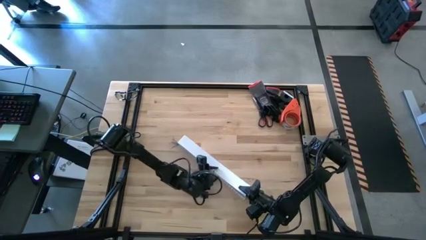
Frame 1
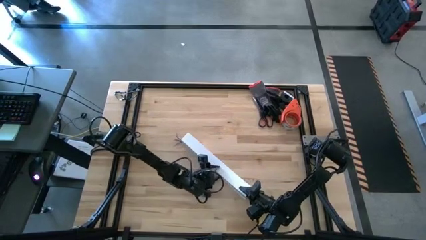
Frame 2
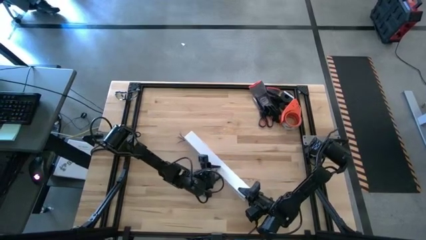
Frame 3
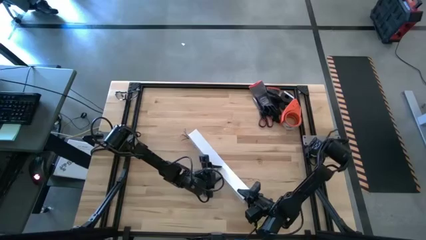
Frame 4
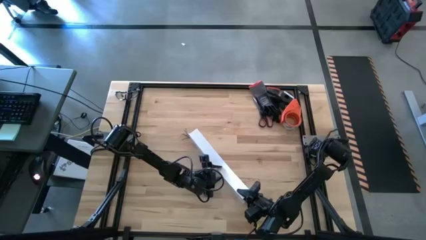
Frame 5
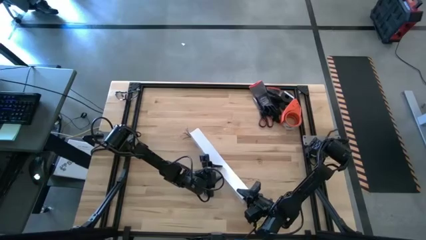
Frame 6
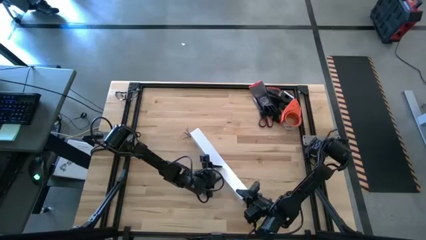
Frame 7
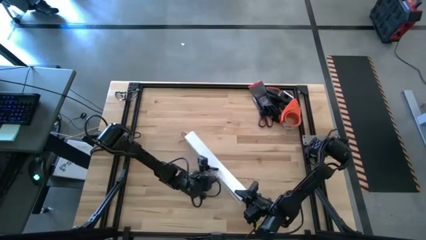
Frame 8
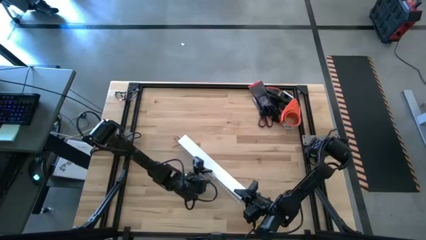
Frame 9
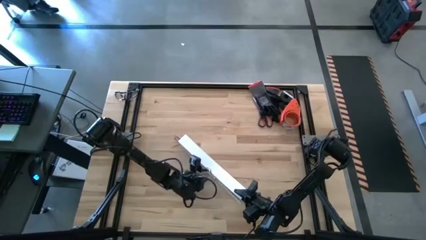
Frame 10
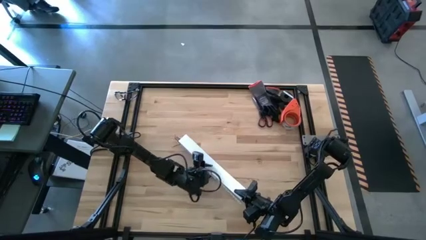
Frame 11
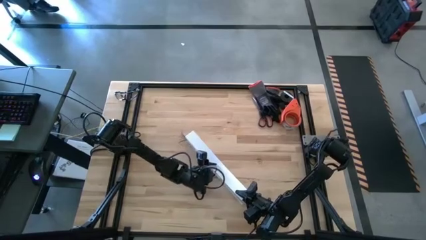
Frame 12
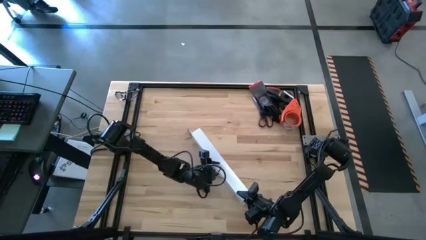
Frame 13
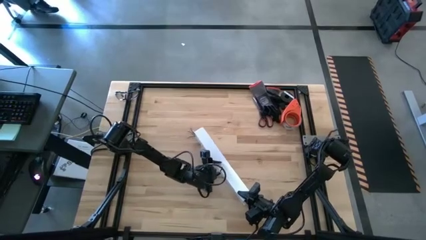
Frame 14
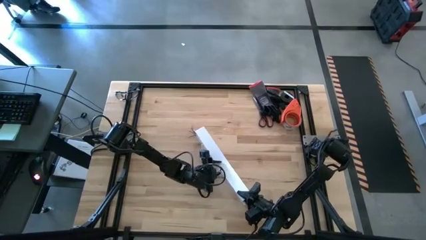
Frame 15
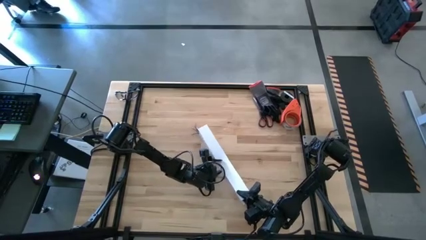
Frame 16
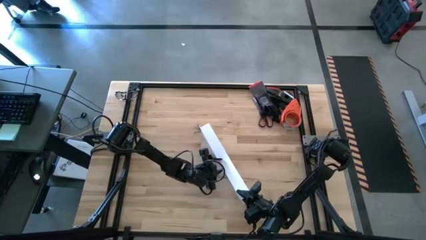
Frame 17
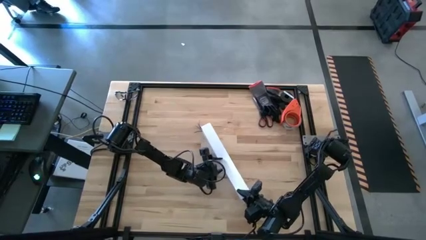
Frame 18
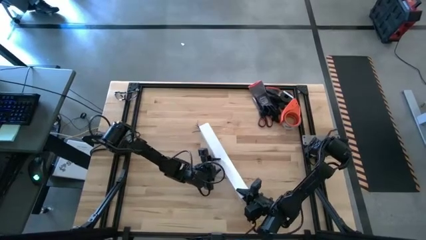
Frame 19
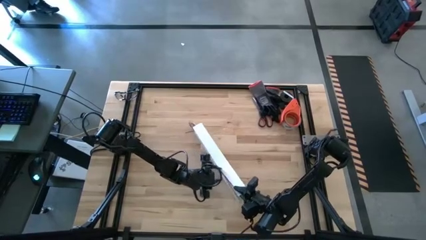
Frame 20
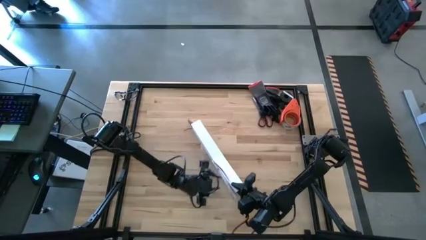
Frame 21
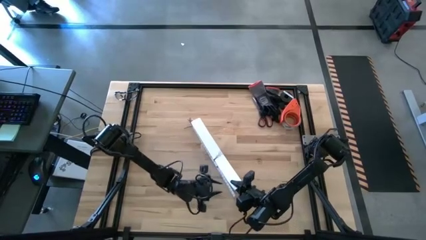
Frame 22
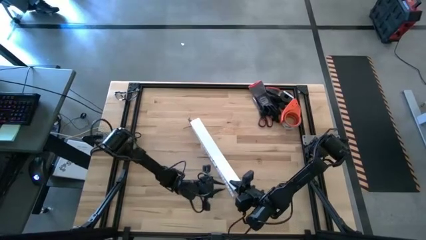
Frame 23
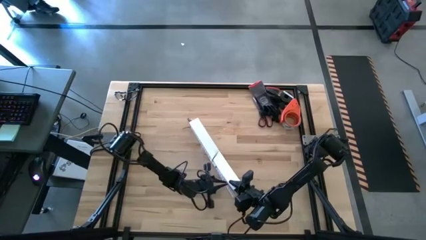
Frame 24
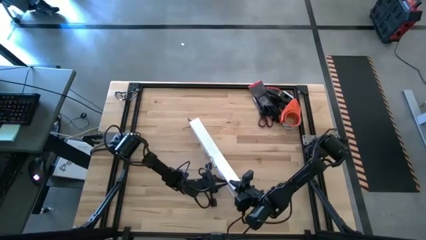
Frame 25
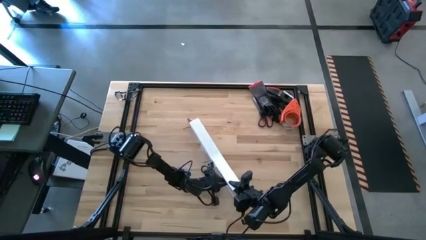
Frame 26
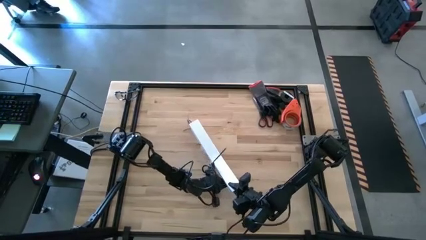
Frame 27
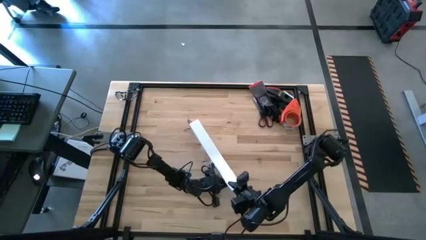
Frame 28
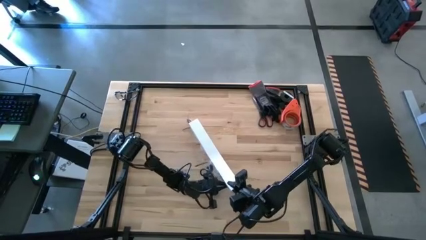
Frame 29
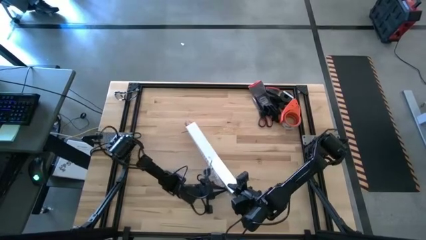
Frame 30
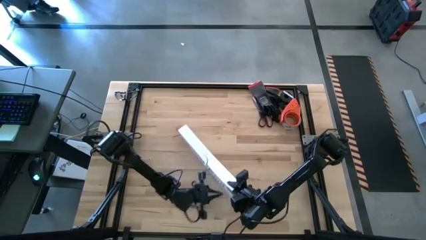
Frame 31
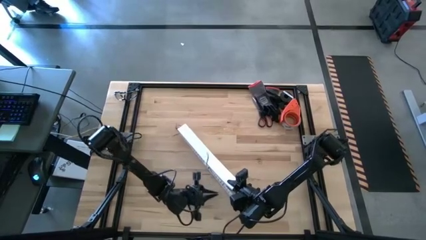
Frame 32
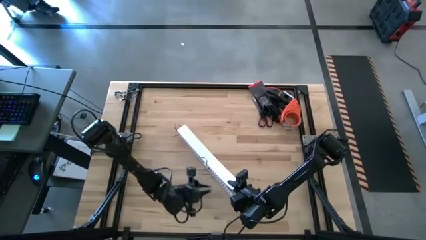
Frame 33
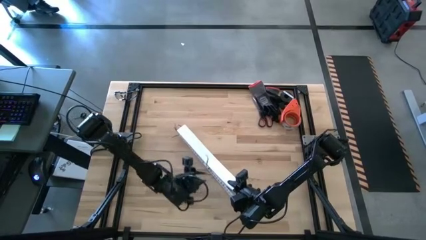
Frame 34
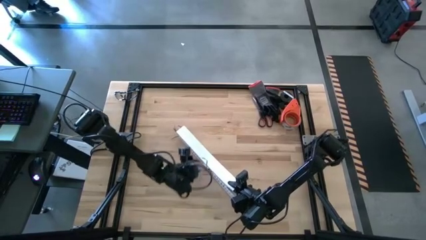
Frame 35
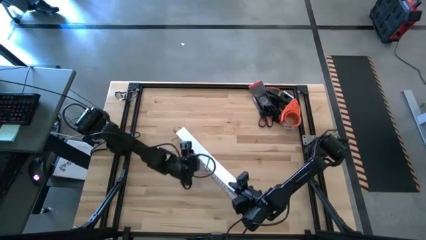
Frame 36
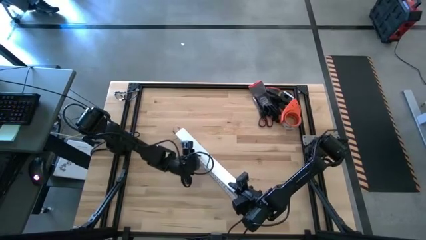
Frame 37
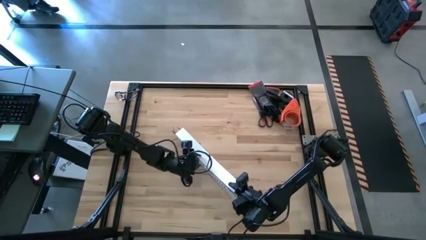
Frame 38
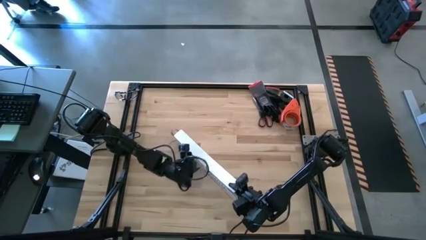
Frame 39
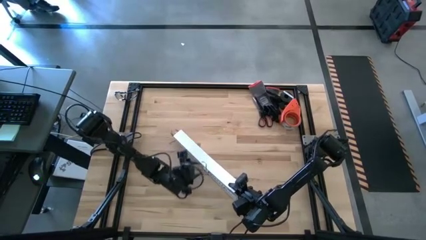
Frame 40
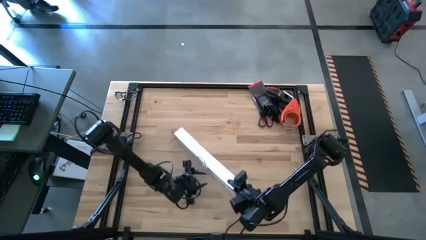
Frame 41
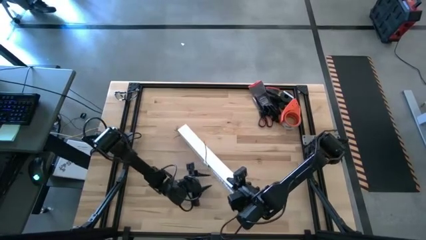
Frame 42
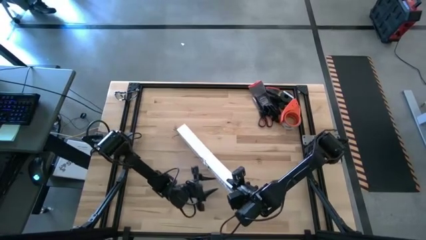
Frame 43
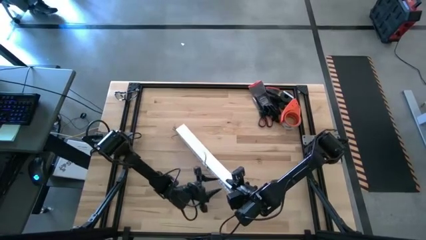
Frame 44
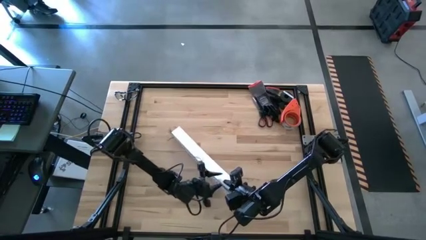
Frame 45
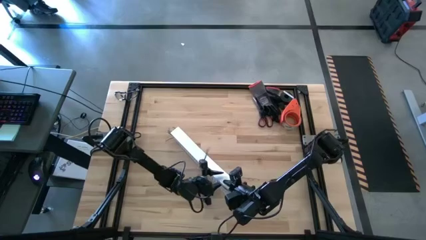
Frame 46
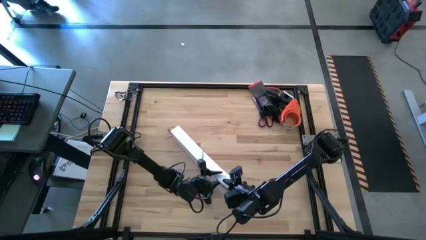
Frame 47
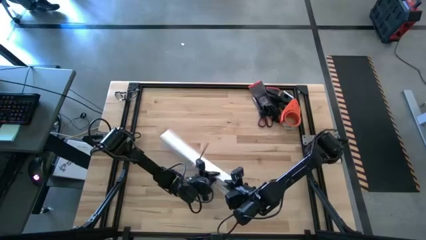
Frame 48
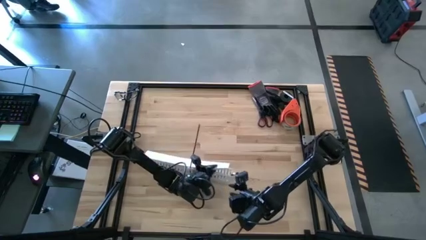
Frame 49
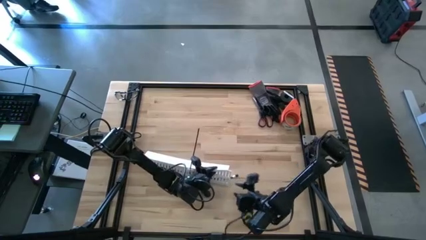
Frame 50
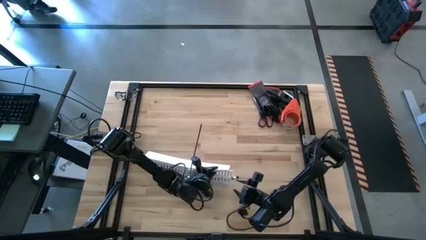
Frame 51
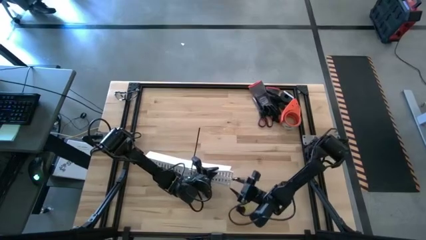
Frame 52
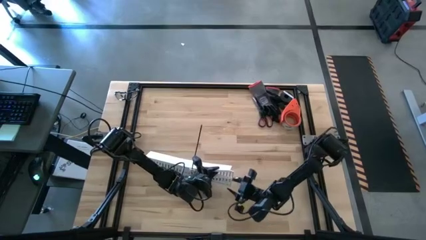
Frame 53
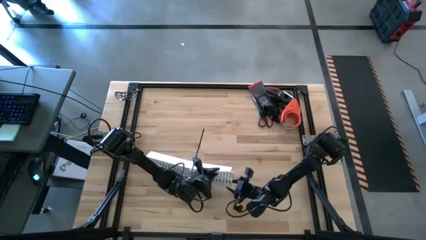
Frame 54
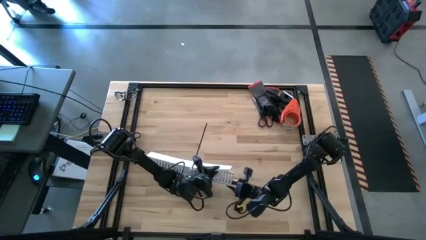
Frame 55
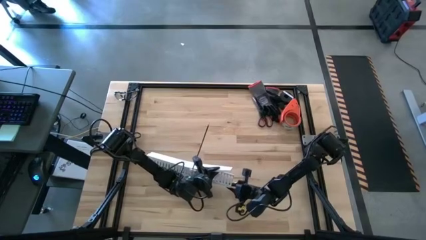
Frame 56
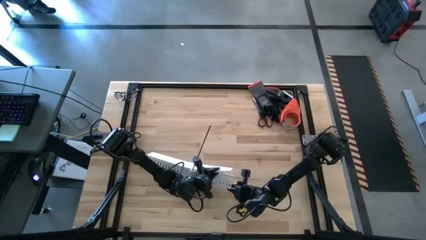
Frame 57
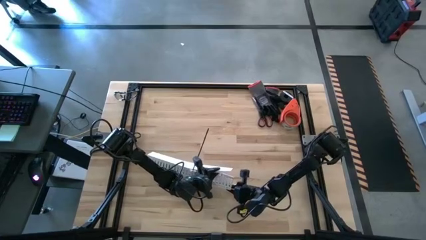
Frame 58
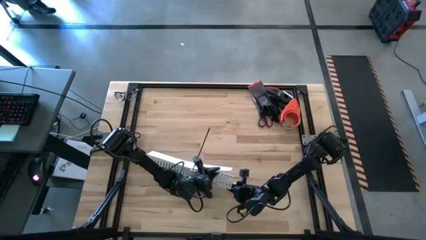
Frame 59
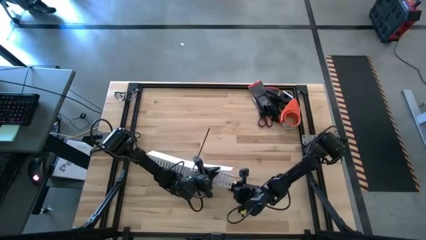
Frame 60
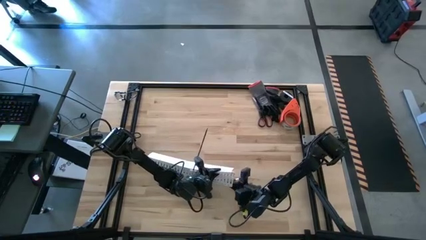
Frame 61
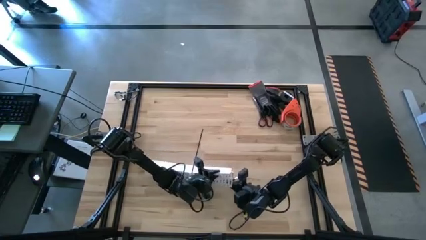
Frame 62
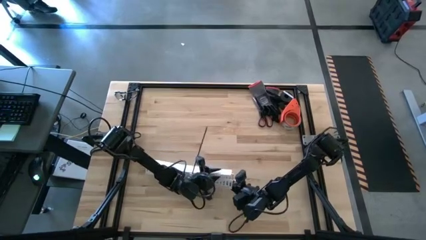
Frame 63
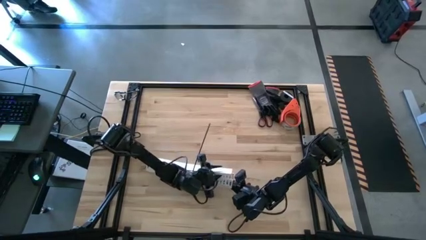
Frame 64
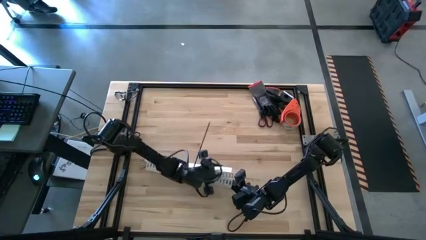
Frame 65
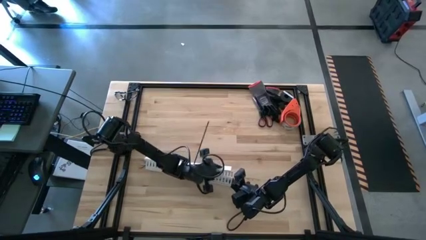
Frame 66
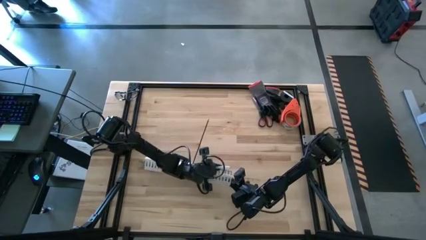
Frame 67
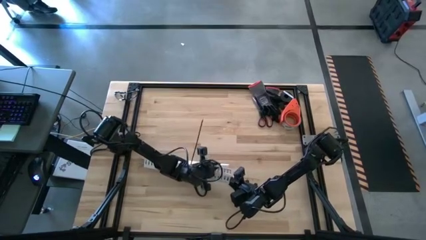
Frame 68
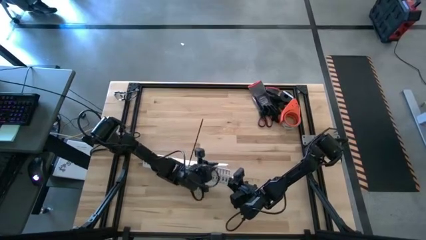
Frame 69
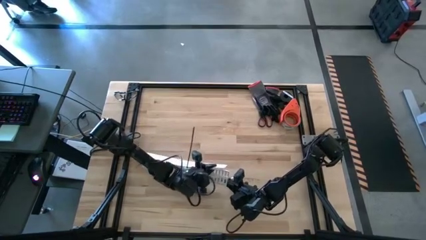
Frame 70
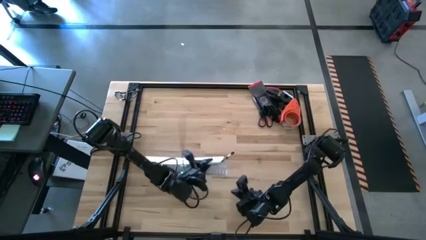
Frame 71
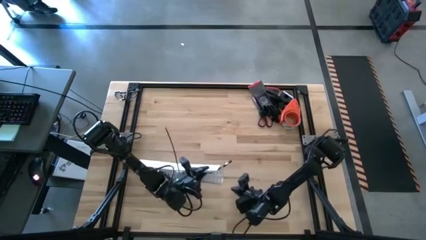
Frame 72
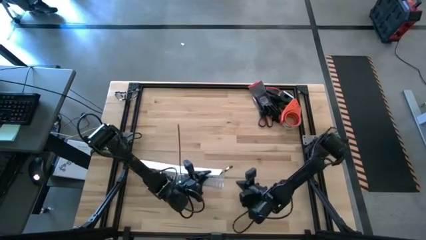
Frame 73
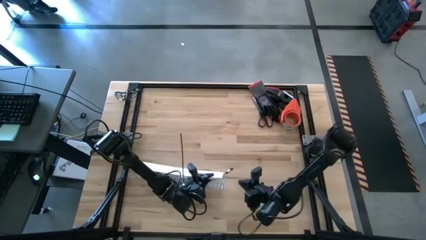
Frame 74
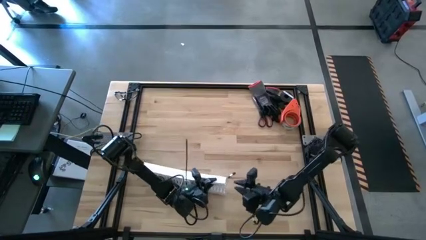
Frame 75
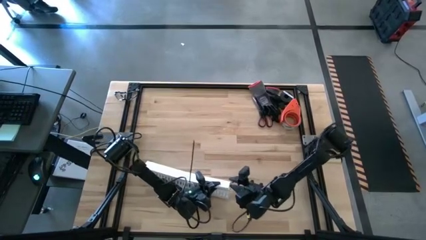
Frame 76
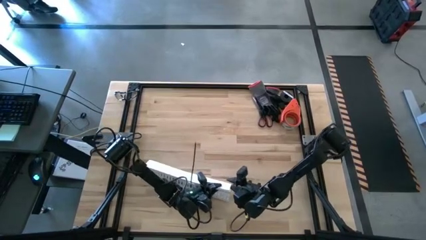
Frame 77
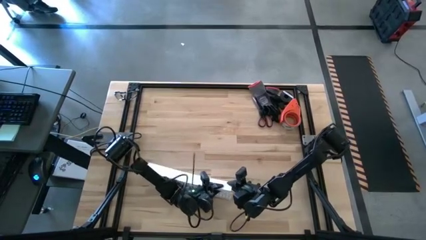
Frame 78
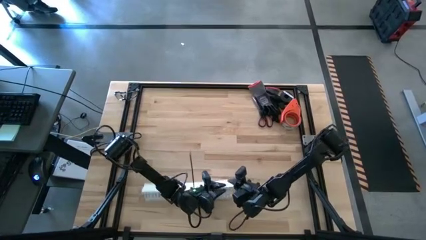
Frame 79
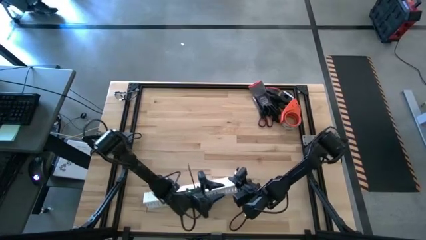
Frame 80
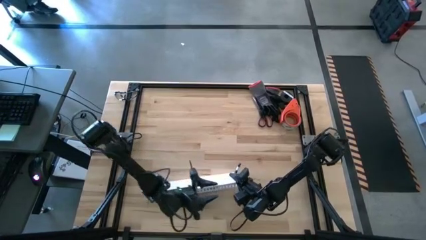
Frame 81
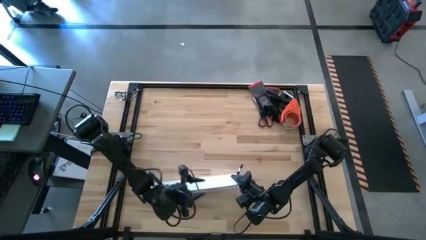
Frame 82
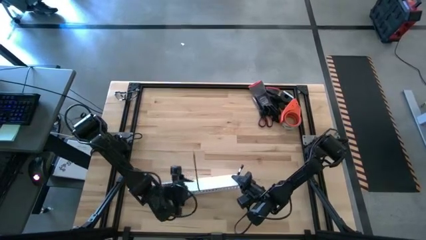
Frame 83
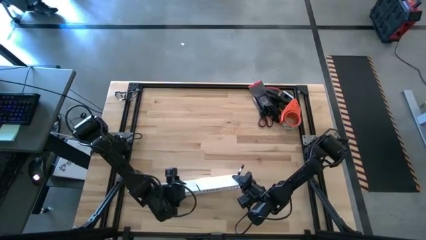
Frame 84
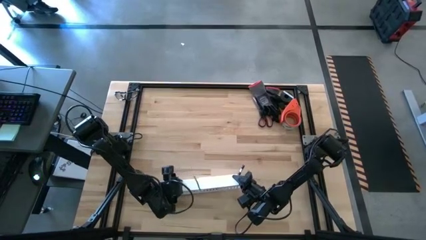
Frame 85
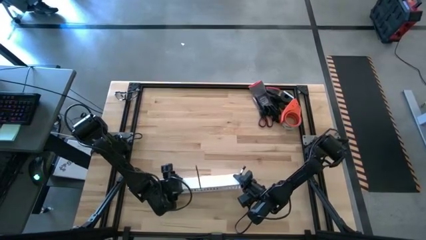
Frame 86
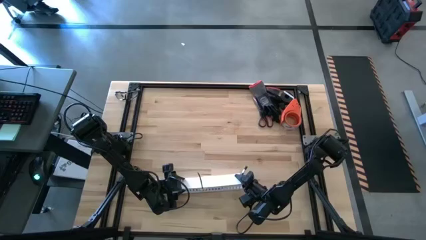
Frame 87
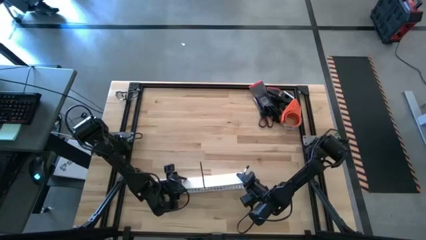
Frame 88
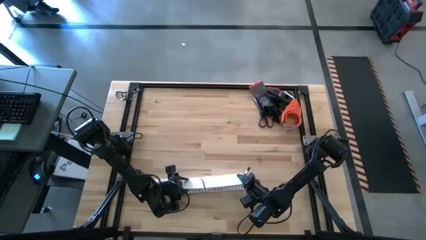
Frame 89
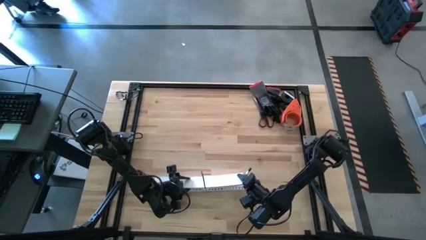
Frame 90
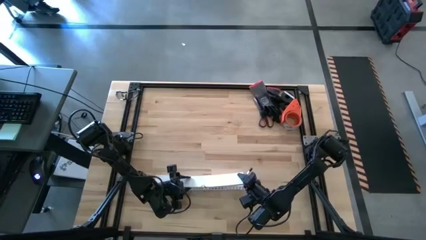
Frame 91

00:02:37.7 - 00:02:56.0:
Task: Ziptie cables
Close the white cable duct
